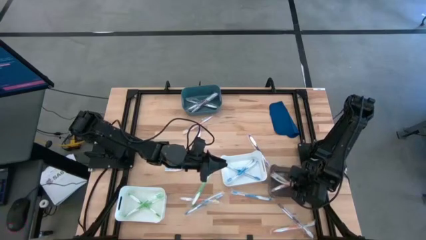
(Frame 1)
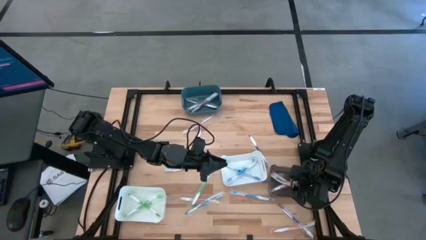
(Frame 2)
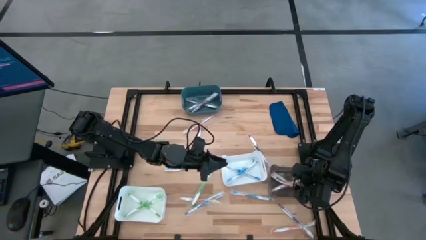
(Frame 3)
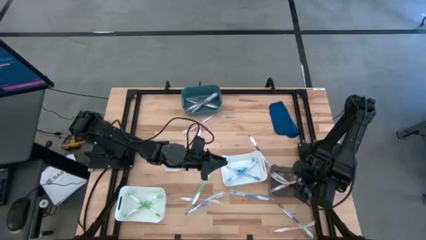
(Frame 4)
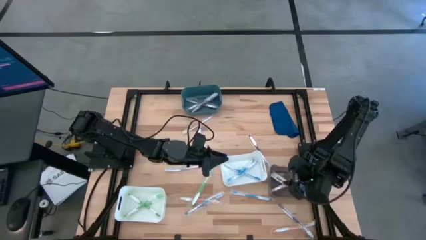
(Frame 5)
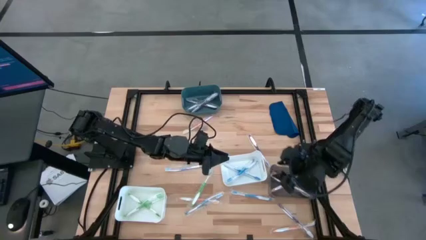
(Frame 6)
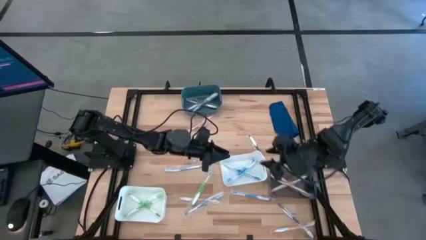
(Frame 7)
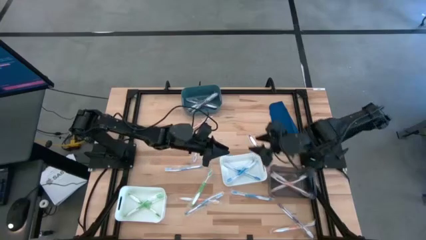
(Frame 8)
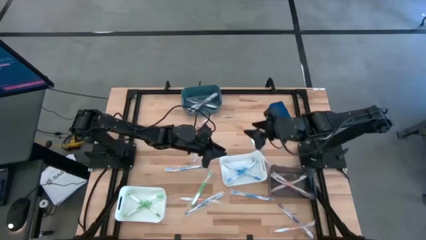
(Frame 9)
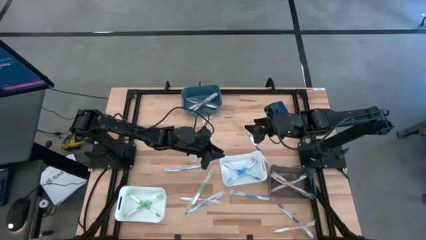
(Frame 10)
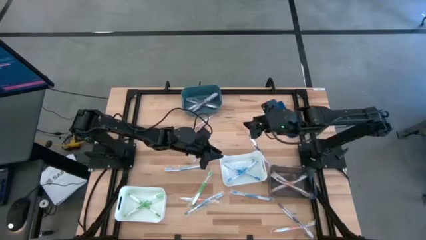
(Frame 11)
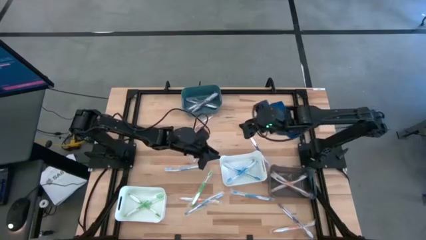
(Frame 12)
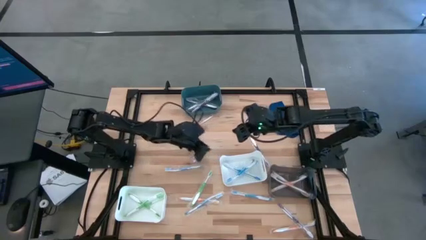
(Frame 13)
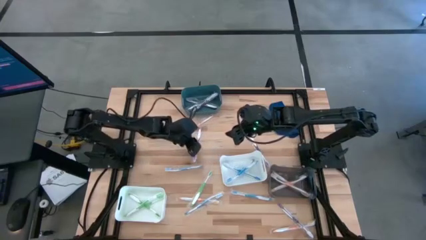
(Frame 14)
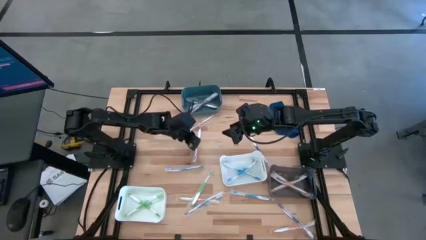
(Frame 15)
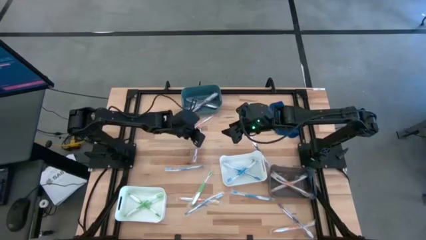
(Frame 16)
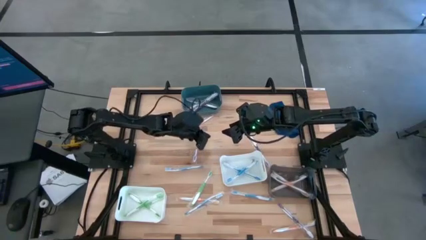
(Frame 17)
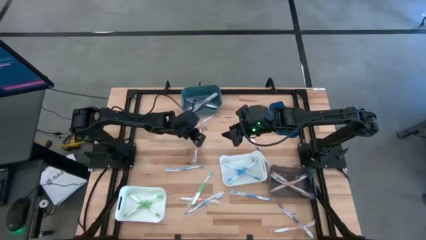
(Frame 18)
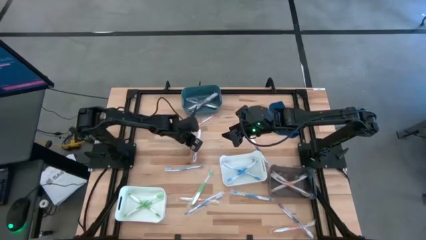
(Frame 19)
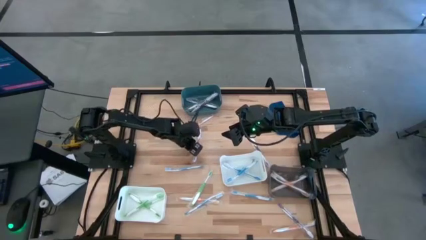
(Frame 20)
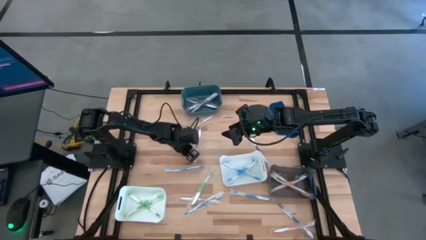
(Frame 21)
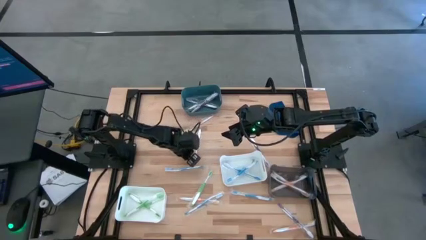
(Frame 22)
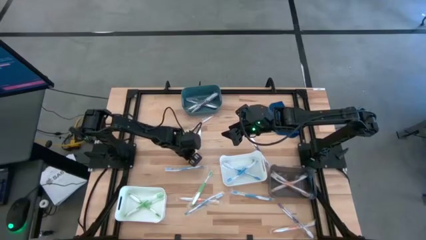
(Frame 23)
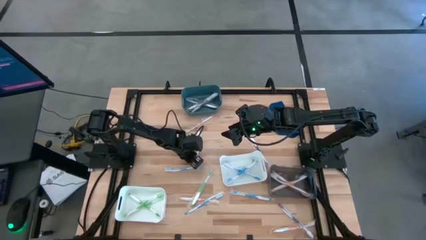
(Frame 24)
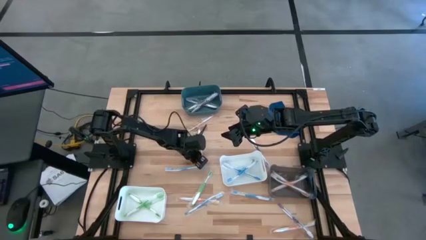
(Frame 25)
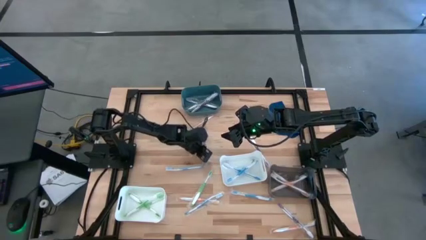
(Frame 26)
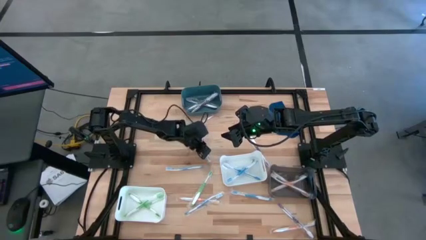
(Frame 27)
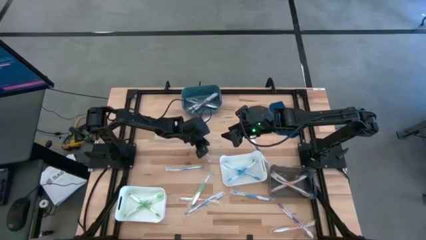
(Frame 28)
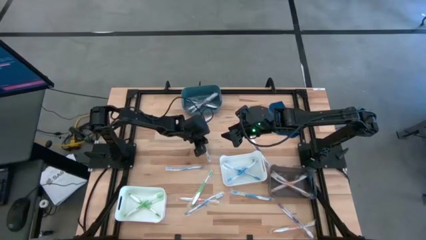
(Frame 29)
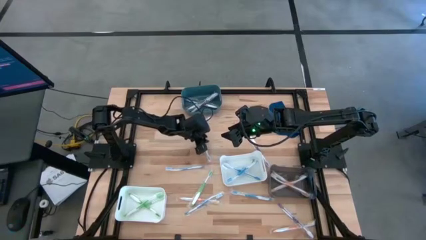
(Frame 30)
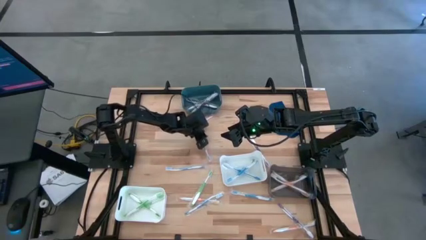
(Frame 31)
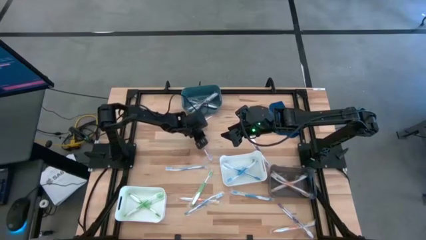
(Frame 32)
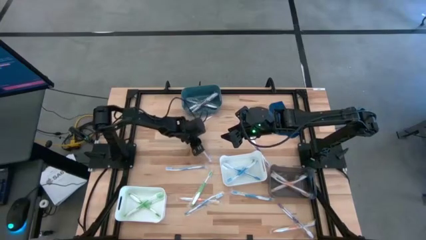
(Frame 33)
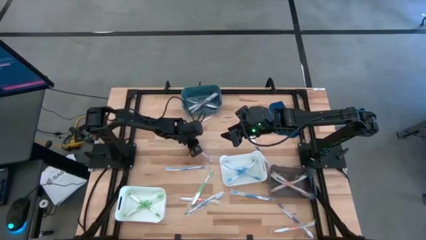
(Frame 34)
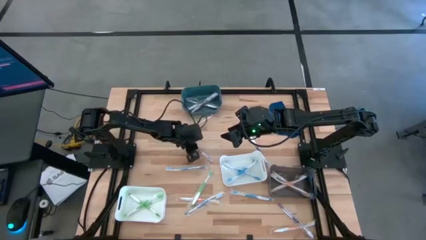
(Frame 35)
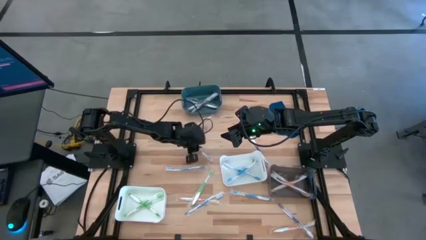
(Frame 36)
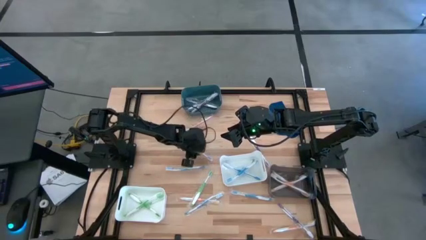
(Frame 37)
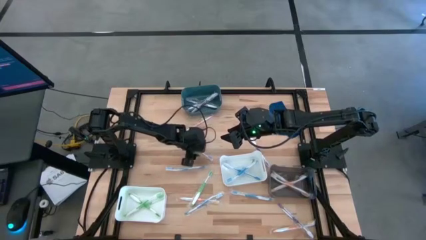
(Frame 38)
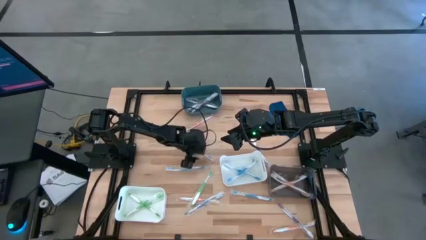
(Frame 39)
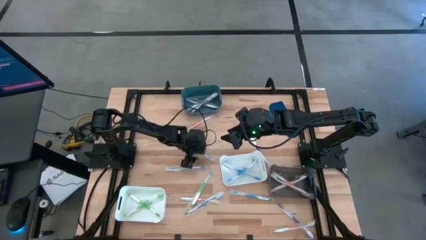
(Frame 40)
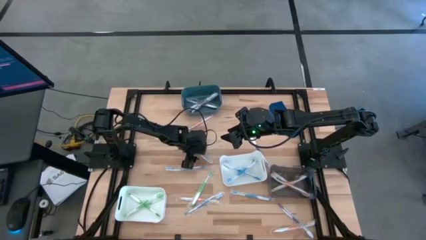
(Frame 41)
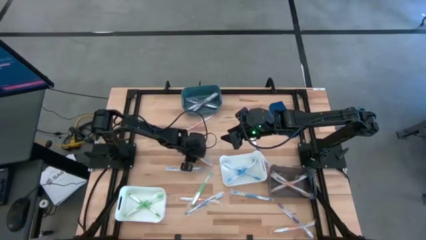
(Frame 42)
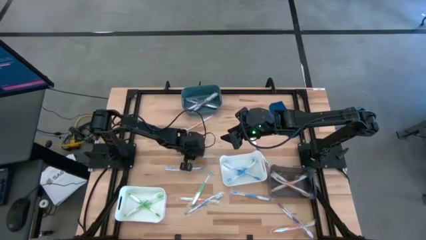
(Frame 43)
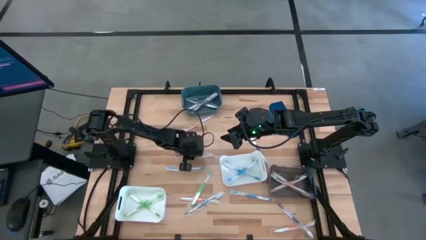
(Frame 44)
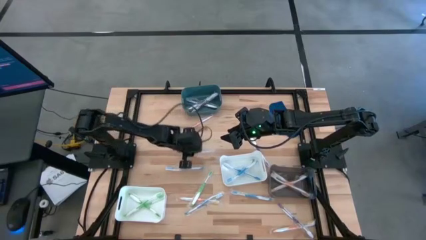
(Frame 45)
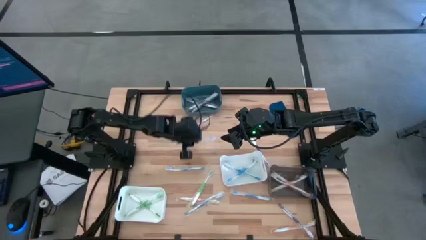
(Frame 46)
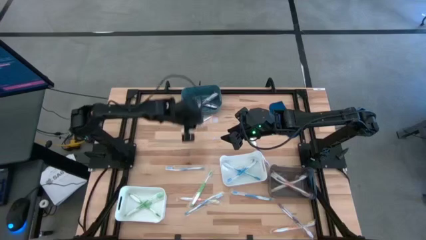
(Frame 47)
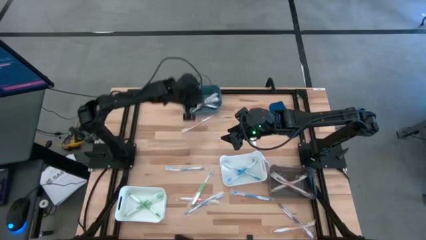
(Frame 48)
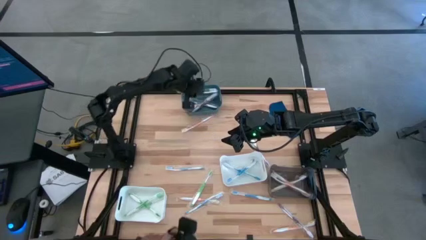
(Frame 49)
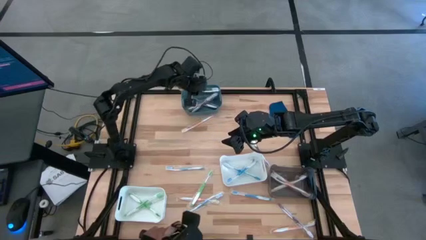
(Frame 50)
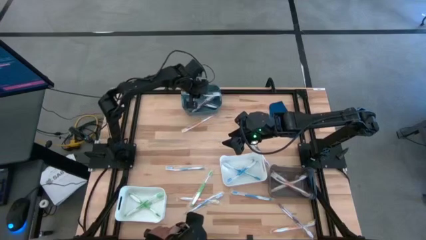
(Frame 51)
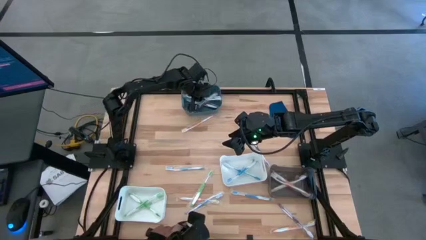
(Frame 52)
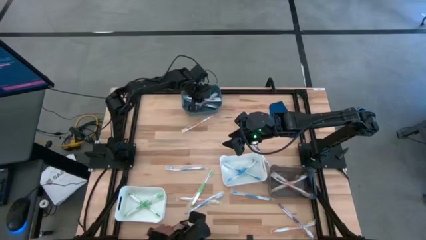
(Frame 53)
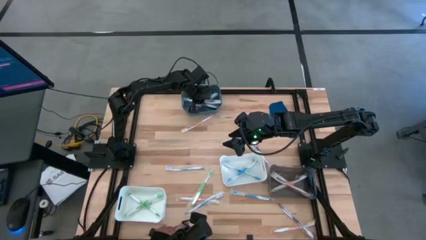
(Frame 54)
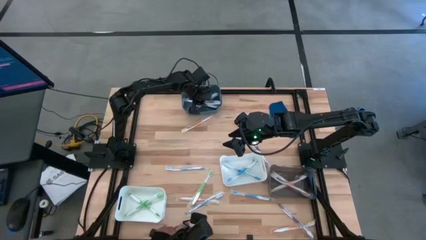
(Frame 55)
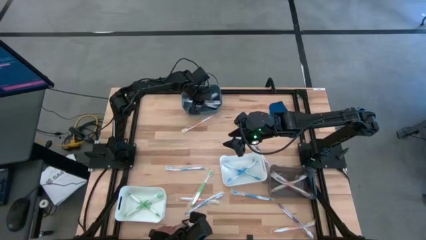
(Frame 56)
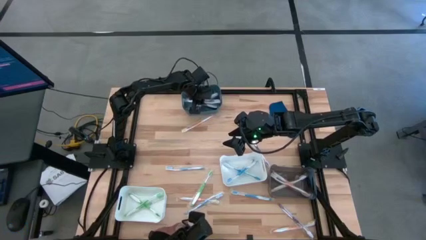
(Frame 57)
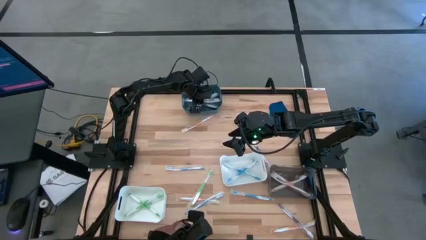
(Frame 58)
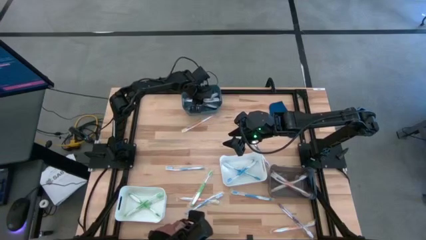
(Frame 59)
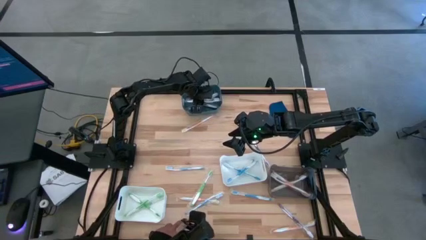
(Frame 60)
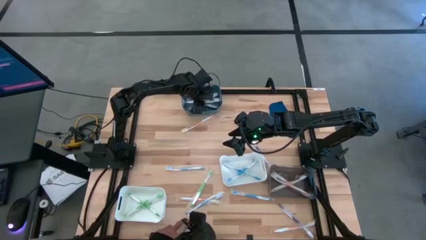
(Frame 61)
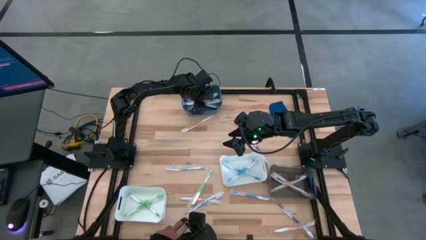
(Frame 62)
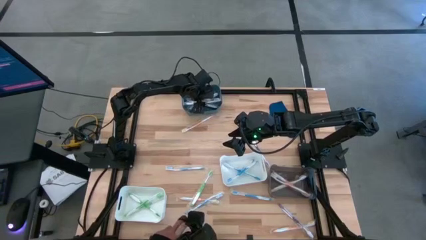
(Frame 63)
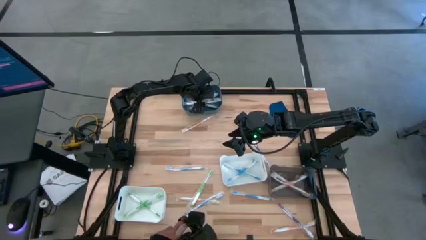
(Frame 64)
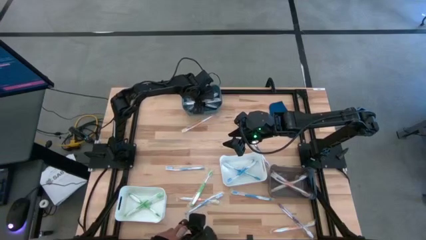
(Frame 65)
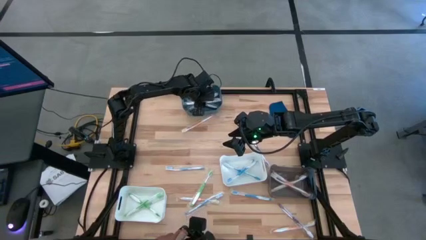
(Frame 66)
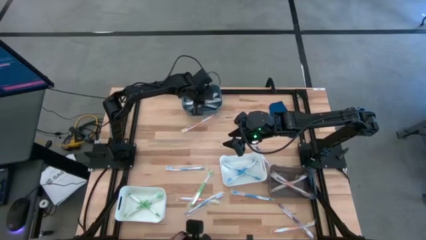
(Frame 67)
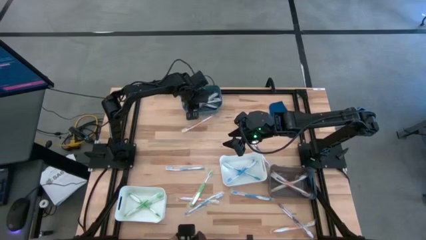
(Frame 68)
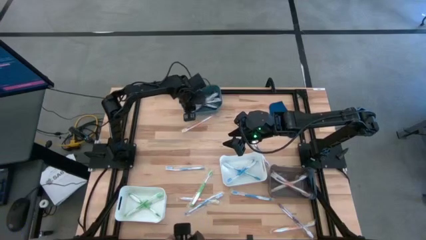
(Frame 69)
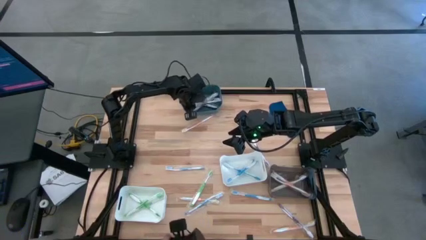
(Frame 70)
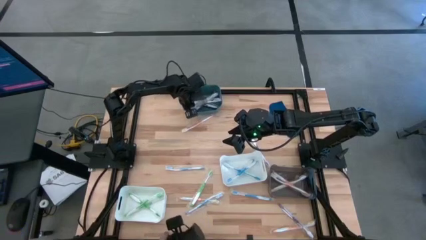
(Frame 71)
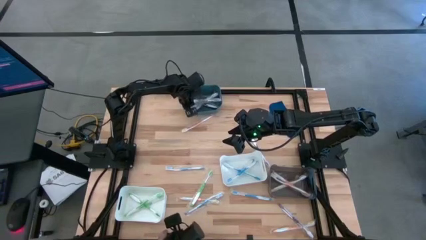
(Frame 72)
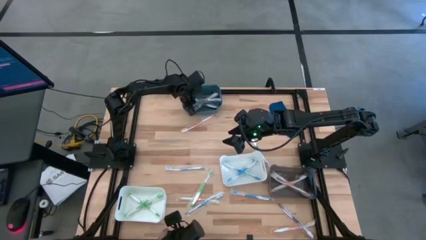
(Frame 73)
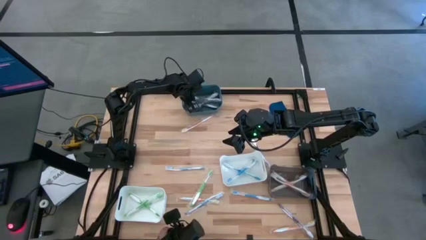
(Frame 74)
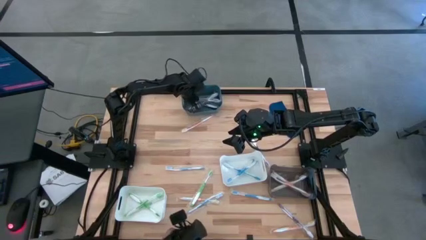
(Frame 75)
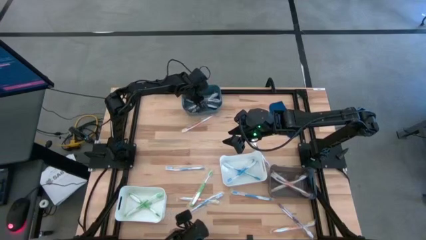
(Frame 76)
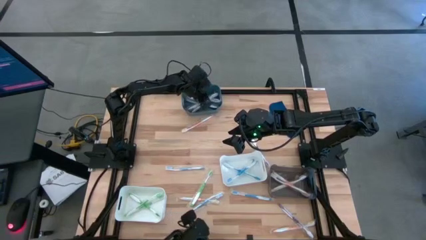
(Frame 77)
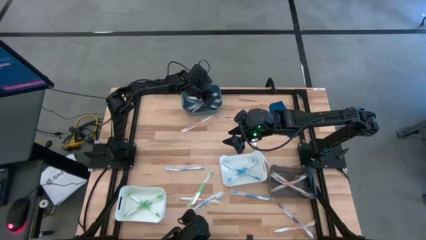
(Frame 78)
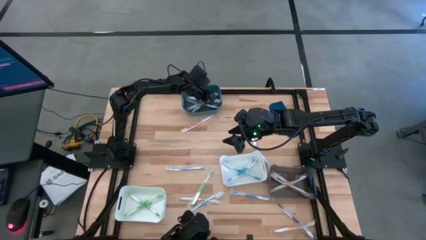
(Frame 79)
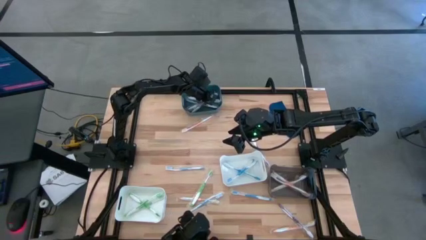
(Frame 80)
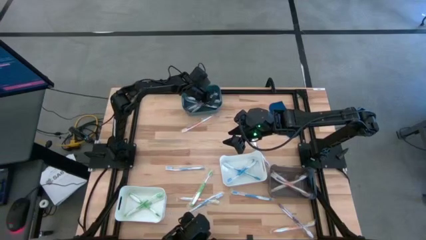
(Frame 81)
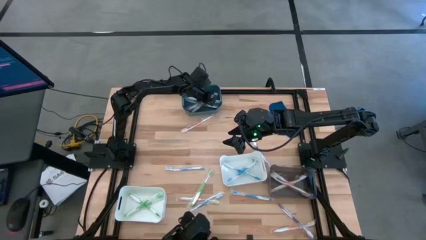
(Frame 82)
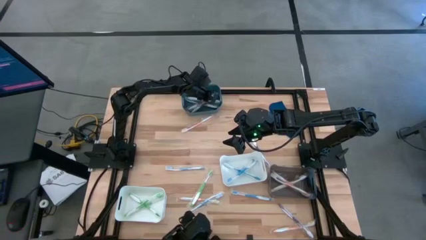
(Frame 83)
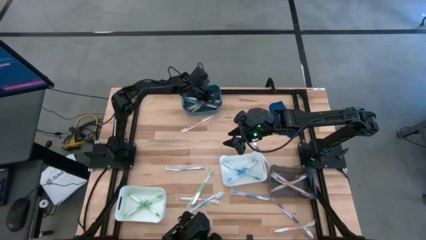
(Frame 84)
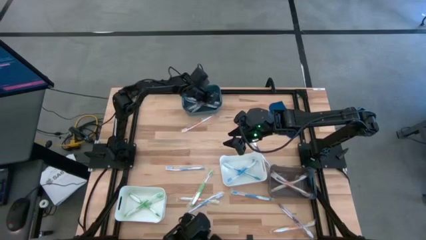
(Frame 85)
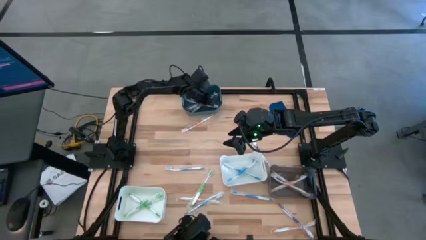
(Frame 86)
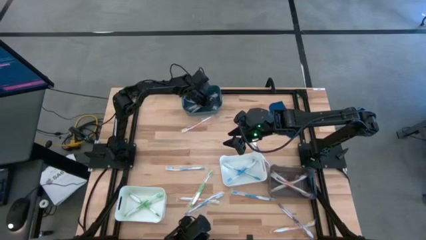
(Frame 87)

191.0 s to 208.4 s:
Task: Pick & Place Toothbrushes
Put the violet toothbrush into the blue bin
